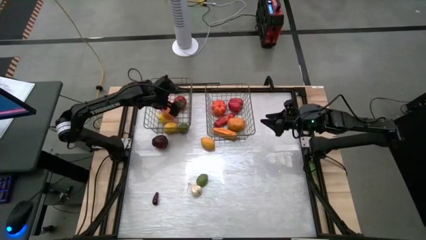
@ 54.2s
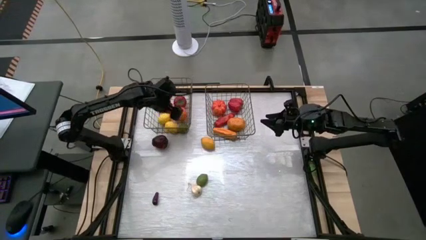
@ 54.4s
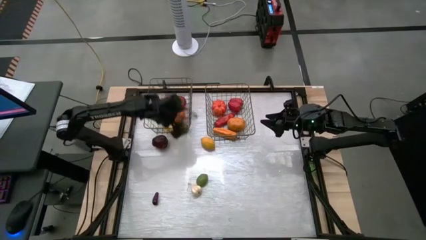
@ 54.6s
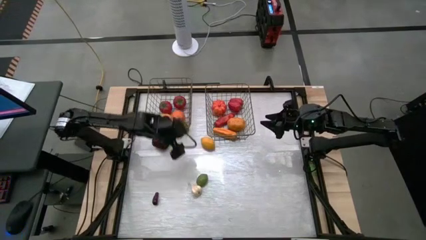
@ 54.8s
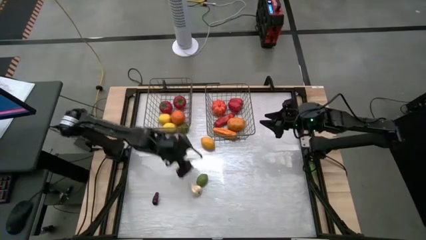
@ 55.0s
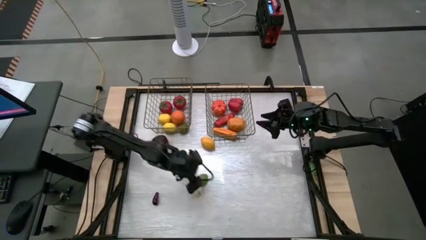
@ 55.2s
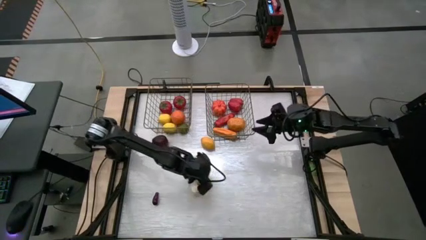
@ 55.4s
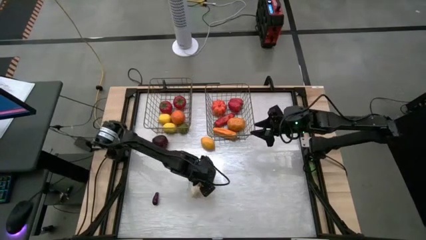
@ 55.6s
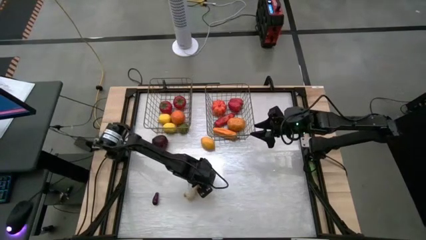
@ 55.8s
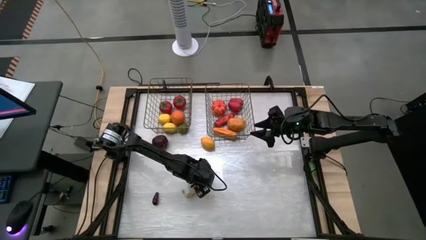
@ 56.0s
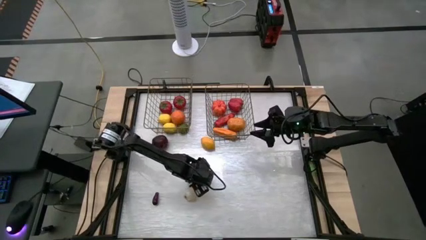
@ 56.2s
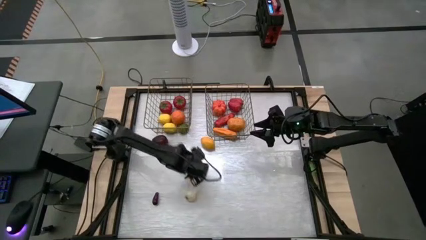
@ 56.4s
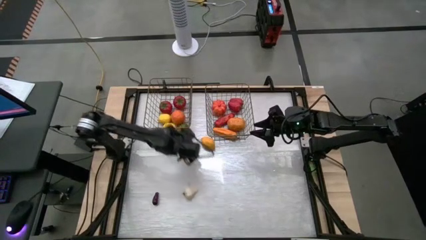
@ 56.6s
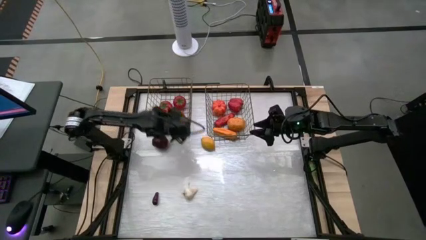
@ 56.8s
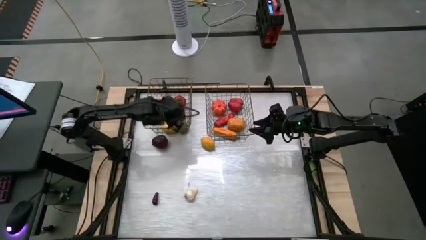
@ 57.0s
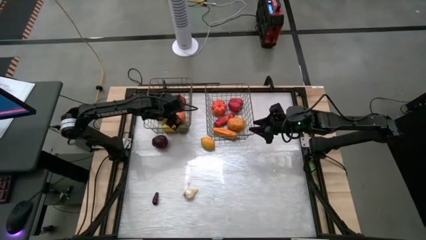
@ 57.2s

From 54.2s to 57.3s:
Task: Sort produce into baskets
Put the lime into the left wire basket

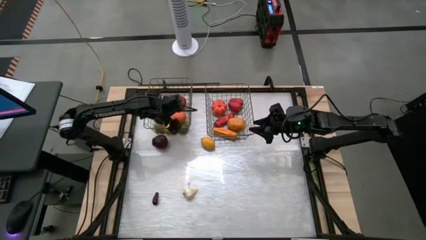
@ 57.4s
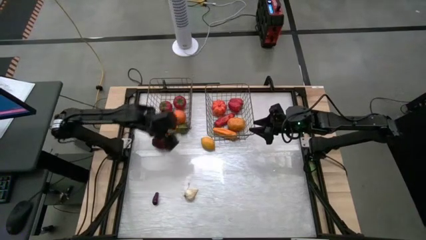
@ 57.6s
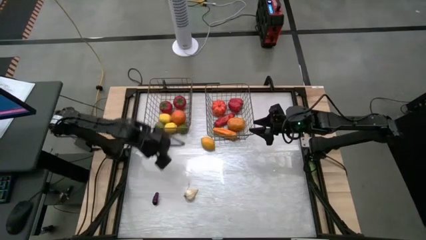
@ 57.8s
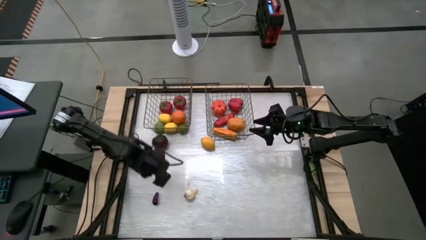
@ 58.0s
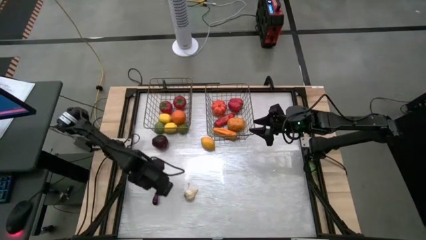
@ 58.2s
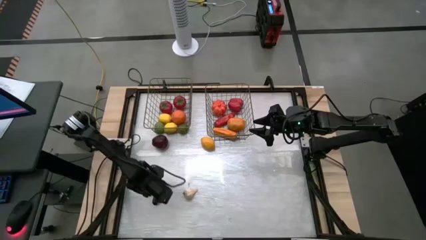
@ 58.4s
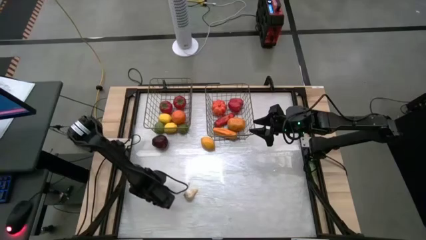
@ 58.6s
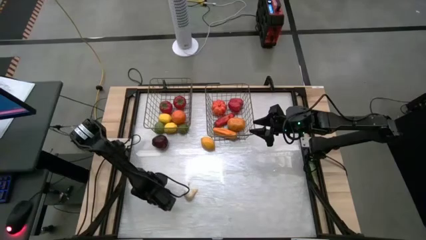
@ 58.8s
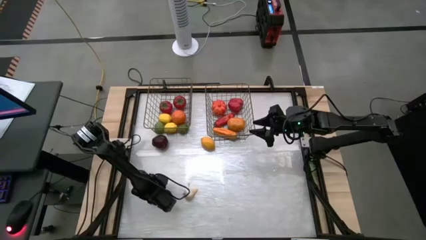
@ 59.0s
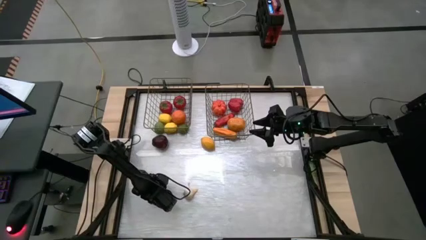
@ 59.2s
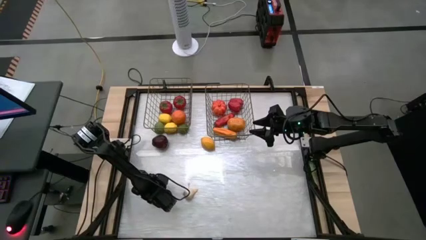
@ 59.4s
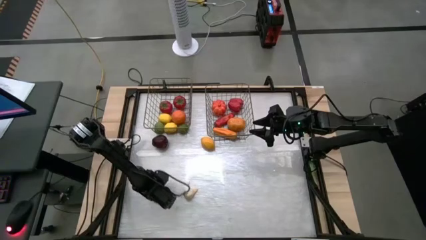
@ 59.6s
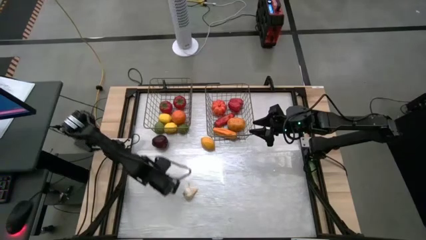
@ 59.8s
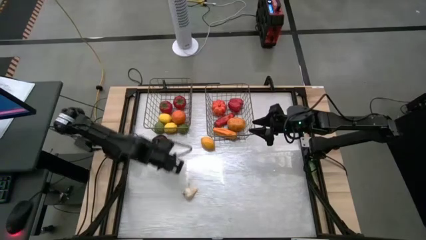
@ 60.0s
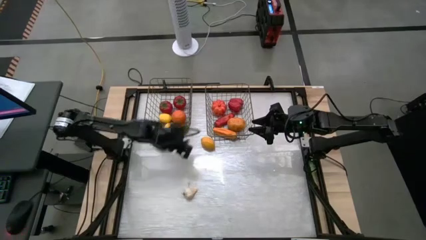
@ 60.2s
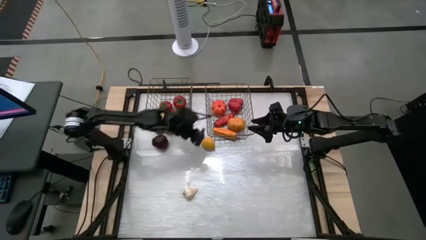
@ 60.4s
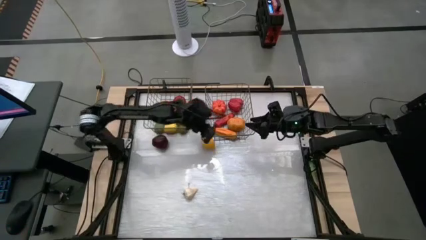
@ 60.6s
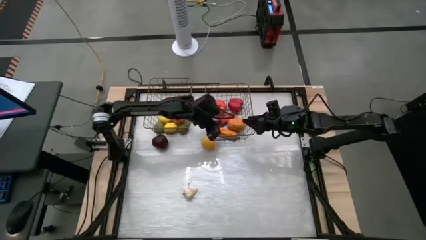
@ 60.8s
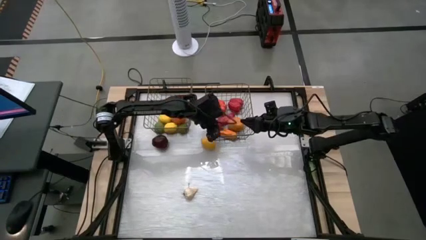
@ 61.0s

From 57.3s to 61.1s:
Put the eggplant into the right wire basket

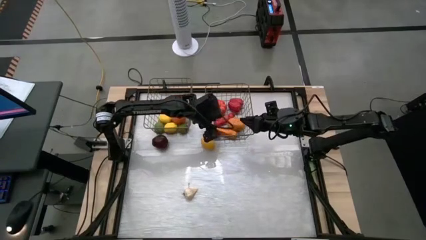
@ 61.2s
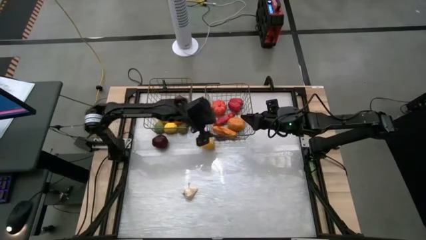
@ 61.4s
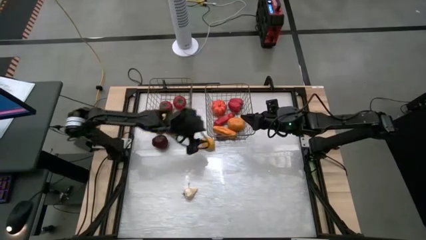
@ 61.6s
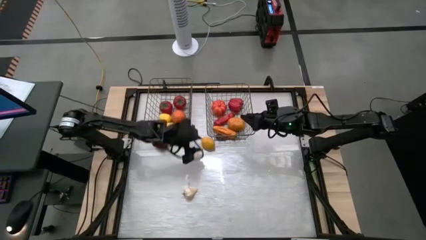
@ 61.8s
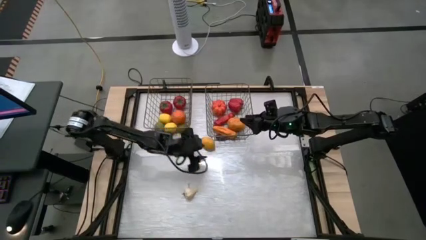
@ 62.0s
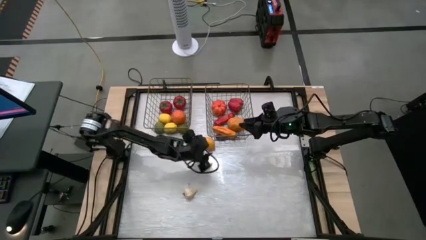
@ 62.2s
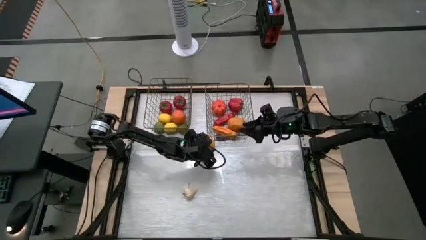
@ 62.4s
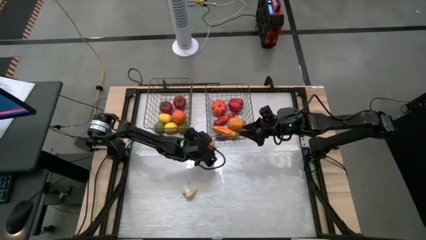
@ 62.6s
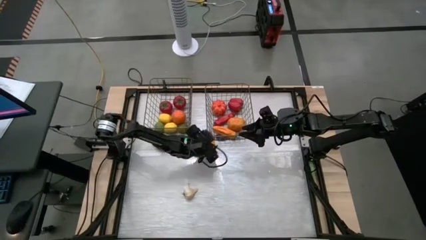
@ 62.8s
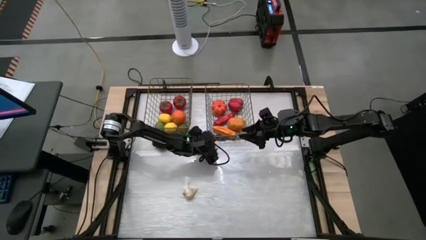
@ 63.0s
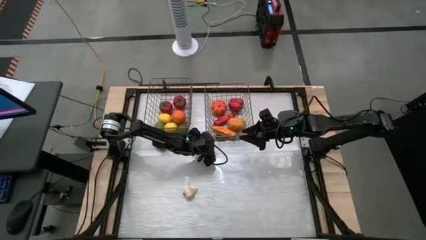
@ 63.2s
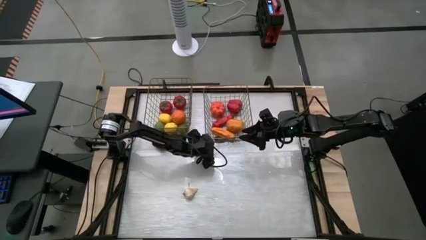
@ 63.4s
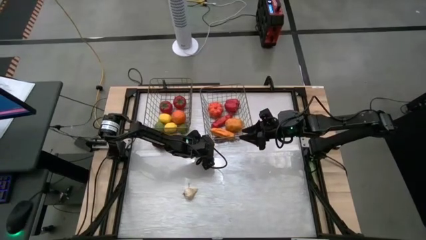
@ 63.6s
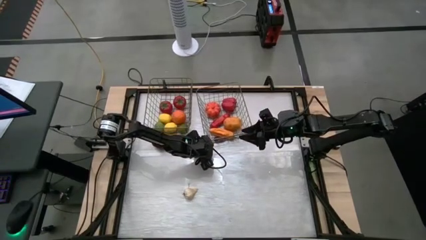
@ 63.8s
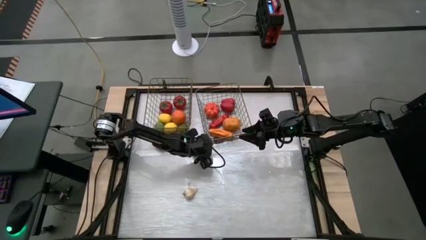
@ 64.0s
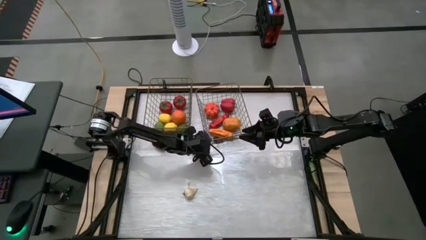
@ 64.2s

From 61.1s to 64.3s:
Put the lemon into the left wire basket

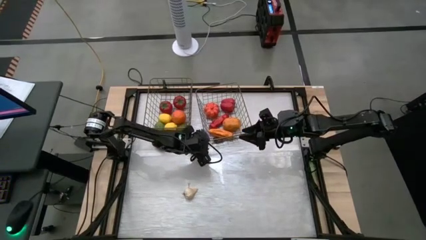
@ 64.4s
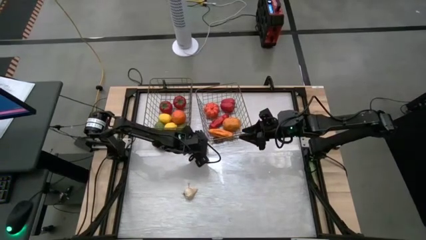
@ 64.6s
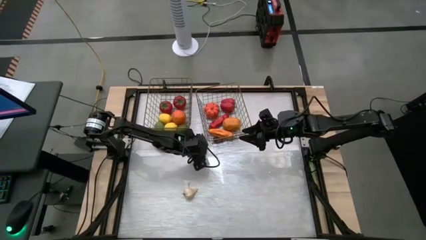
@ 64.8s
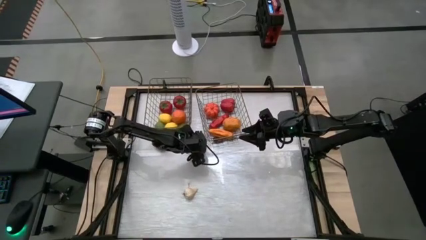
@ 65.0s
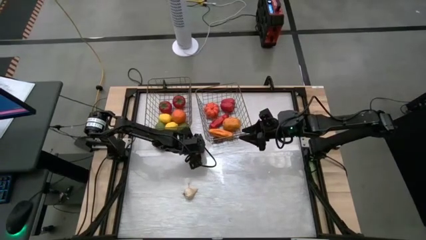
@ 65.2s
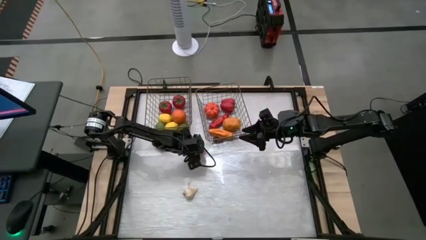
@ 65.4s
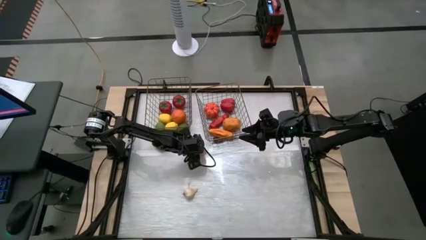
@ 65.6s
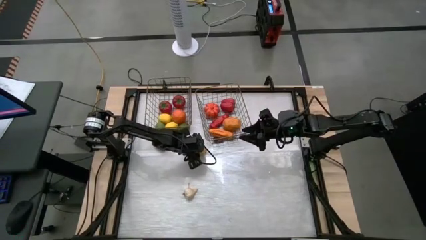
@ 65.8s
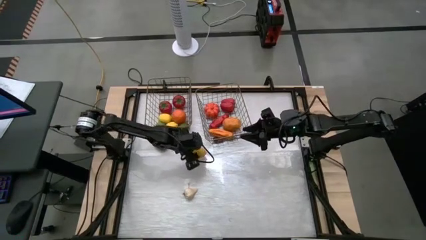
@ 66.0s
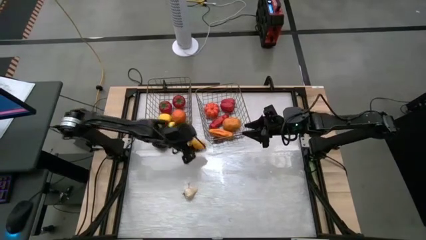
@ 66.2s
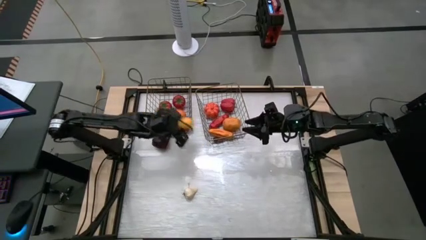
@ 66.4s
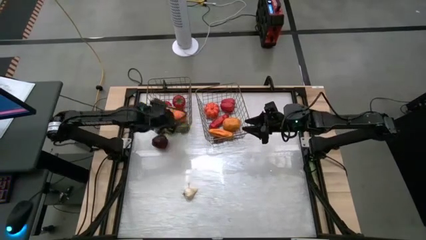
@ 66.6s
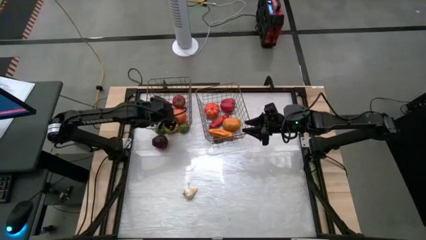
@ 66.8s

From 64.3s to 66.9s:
Put the lemon into the left wire basket

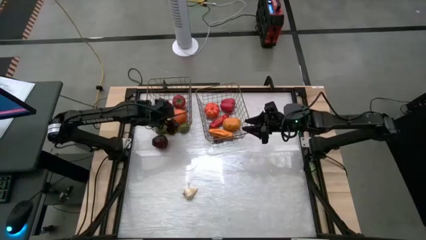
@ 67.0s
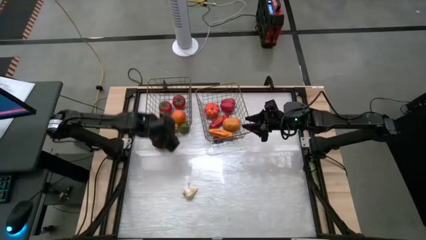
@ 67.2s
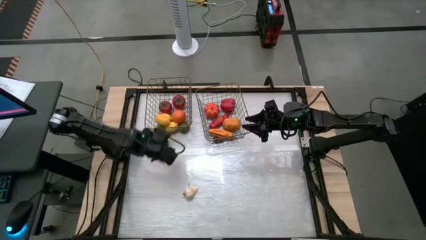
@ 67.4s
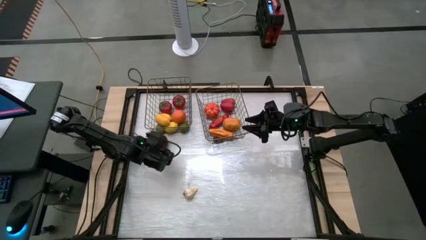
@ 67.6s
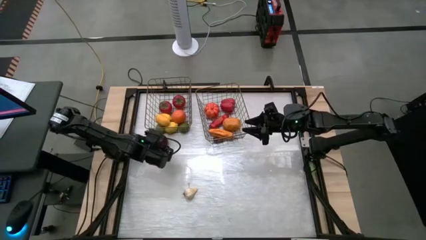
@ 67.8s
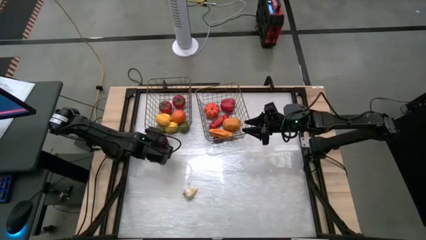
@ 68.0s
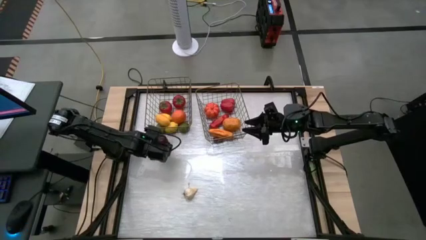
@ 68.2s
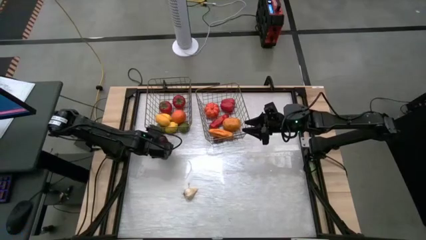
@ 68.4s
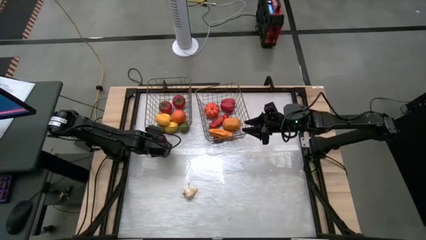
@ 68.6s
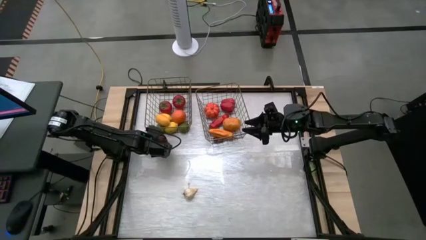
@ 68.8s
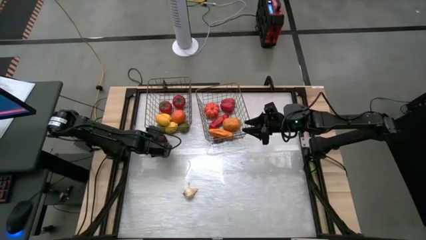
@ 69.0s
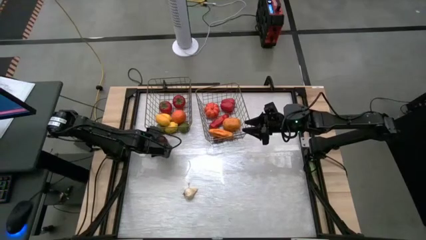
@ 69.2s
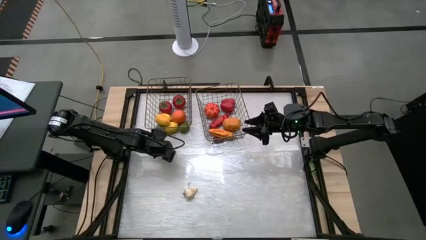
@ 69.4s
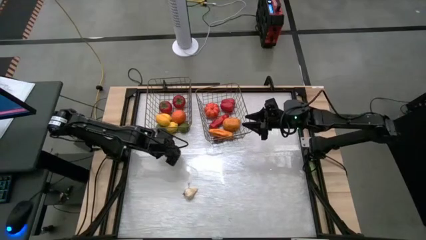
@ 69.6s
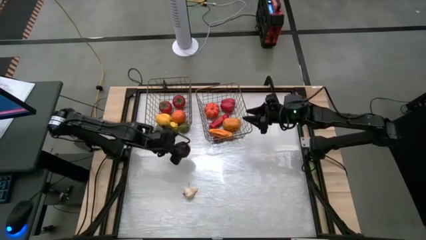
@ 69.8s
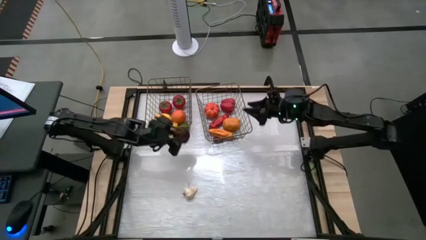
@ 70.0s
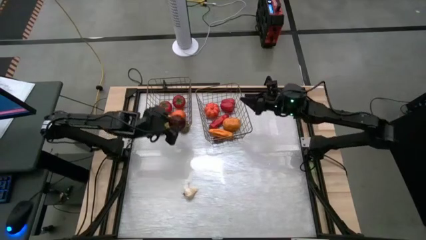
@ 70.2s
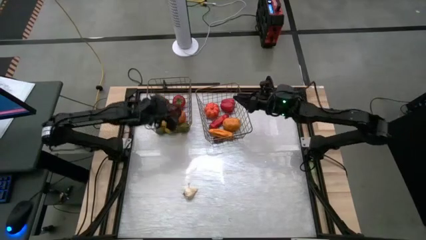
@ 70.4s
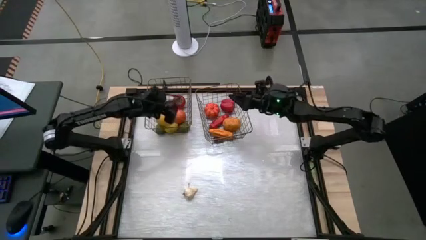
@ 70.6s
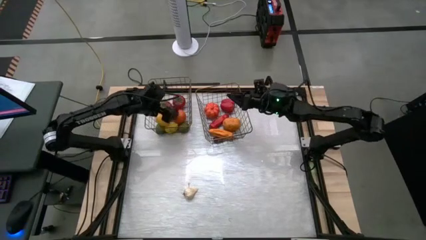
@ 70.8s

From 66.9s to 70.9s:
Put the apple into the left wire basket

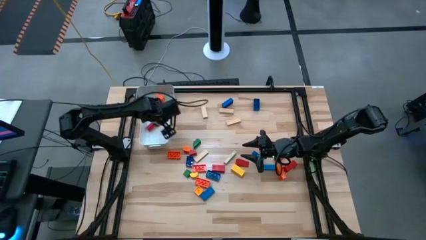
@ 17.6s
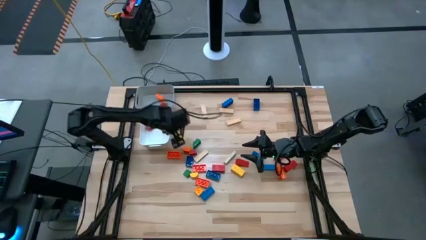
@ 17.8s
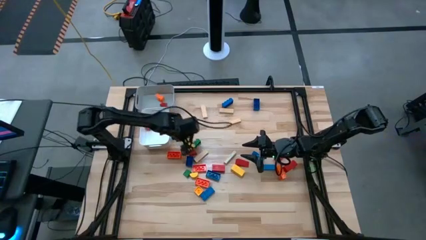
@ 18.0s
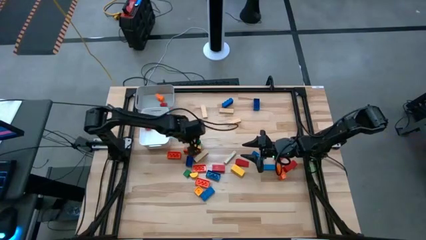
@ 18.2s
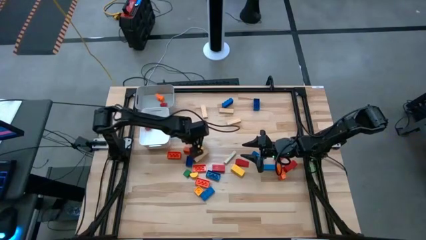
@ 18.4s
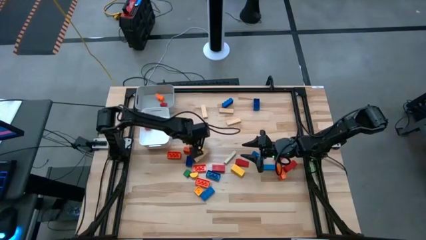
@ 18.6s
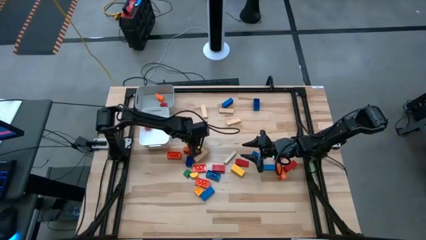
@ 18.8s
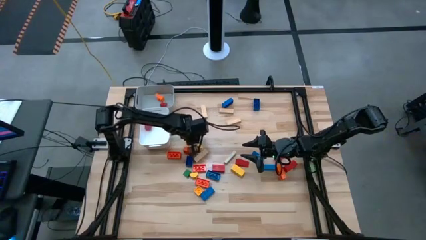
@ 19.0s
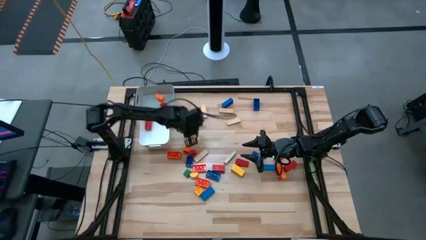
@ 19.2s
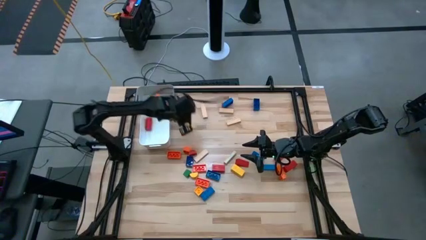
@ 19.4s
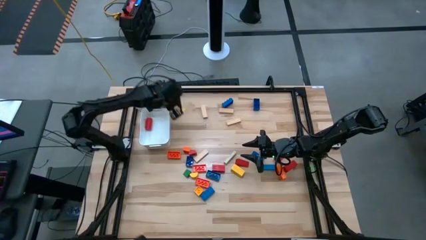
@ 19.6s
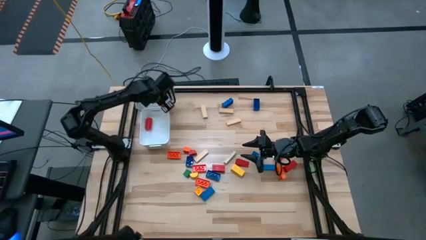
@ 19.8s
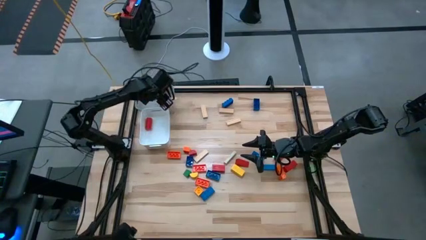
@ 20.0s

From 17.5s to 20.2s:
Task: Sort blocks by size
Put the small green game piece into the gray bin
